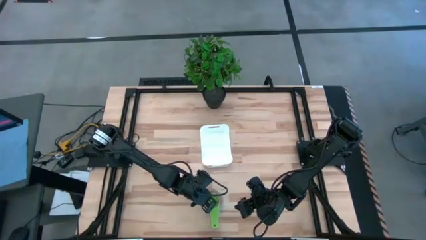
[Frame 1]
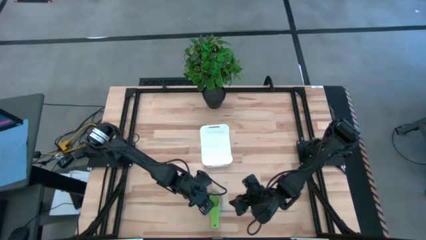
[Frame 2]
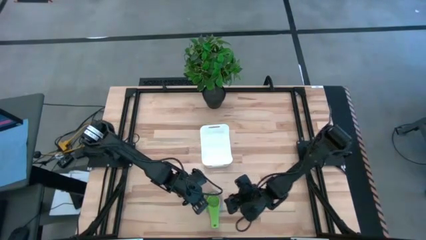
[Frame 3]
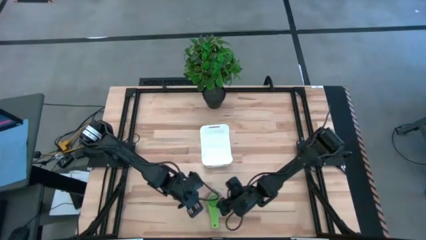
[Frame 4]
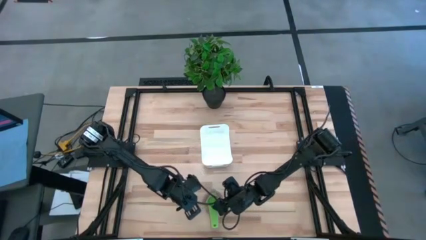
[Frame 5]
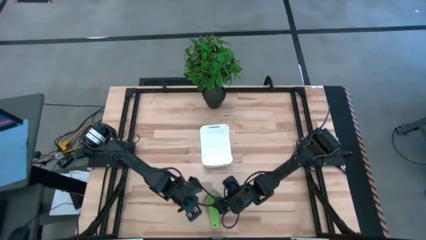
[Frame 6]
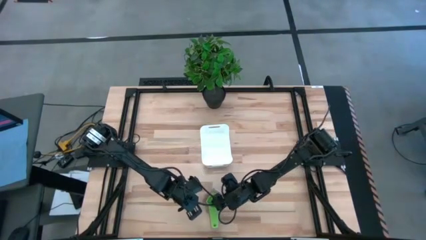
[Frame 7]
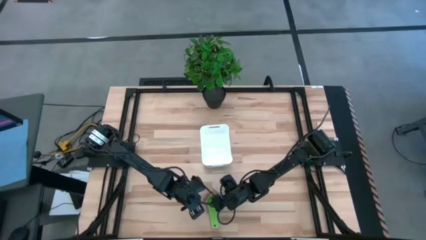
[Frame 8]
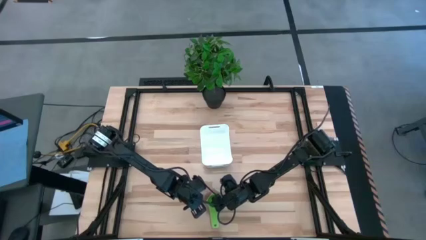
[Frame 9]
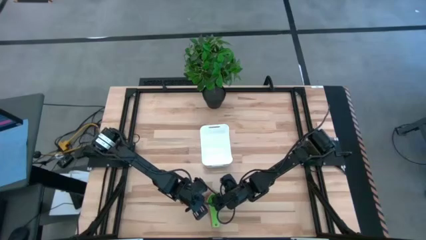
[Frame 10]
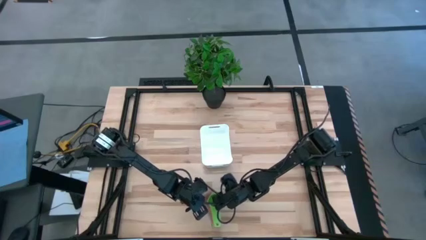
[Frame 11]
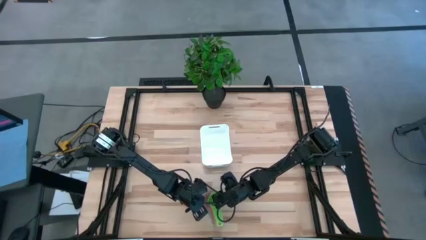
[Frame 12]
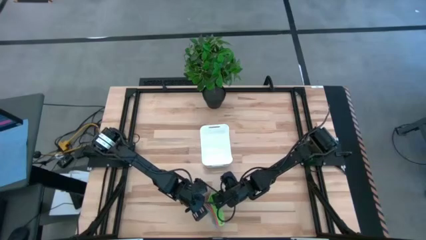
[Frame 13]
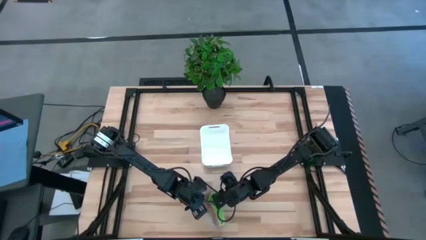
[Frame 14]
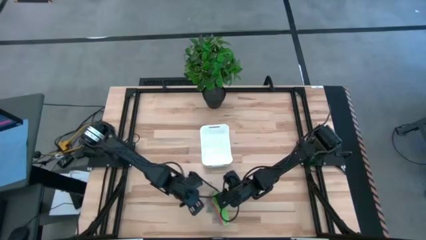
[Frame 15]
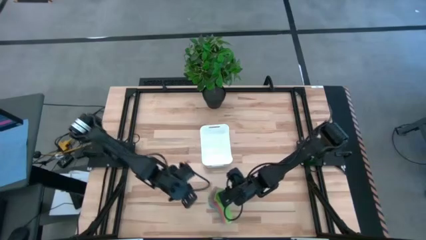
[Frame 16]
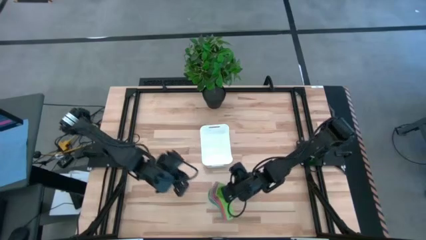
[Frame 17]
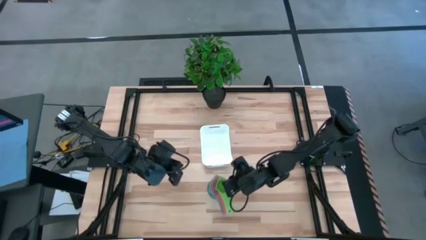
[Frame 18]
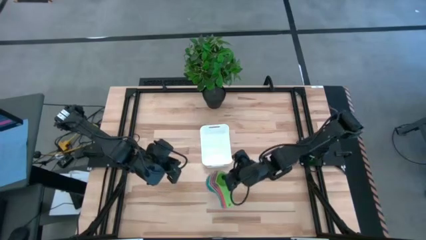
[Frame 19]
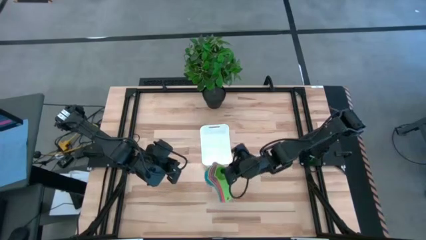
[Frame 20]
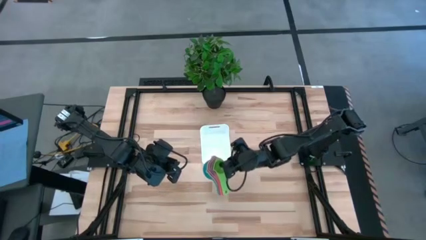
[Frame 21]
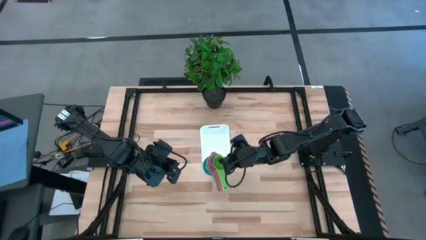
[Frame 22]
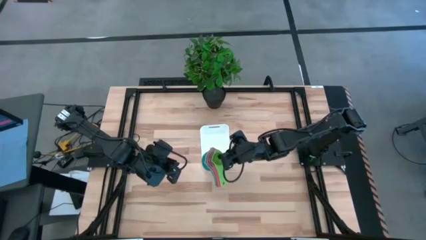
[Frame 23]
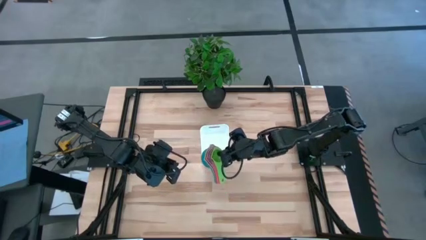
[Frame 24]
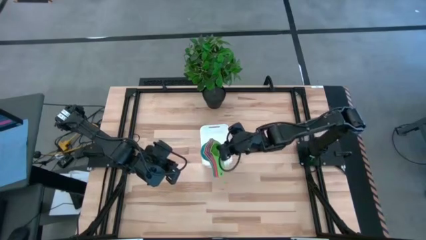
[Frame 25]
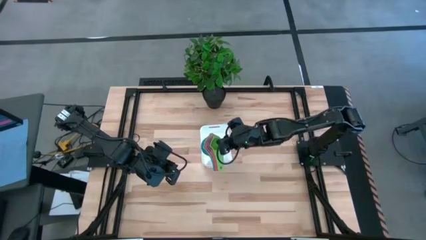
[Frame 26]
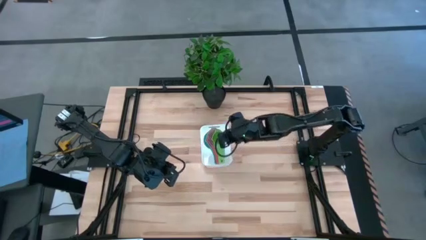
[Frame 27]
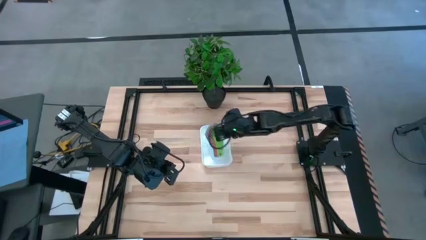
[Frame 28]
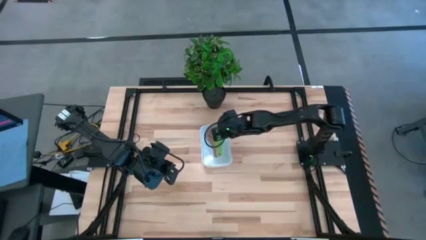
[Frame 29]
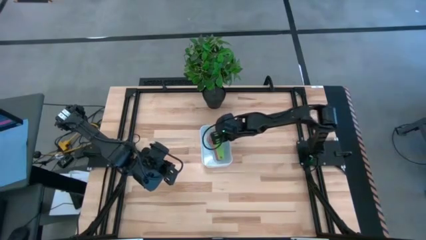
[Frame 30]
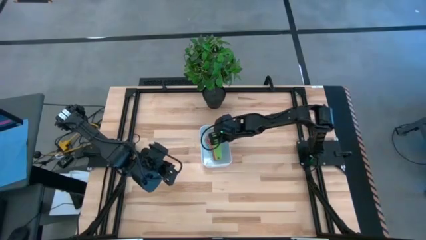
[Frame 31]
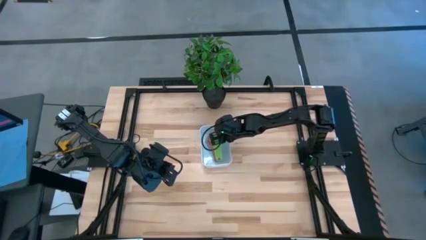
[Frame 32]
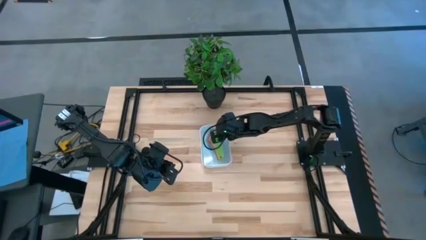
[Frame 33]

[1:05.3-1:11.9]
Task: Nest measuring cups in basket
Put the nested measuring cups into the white bin

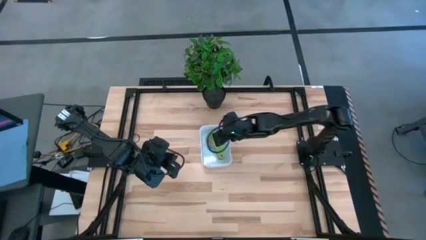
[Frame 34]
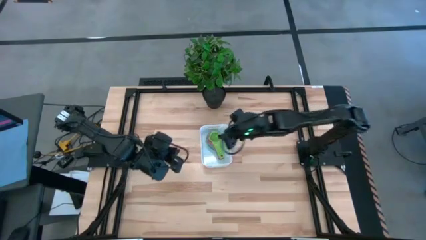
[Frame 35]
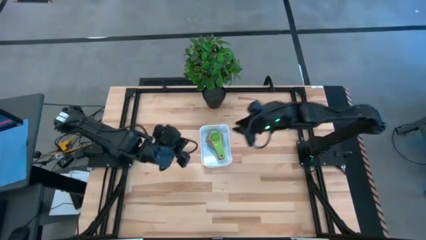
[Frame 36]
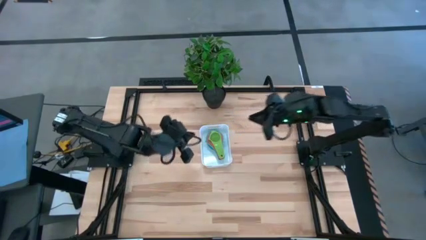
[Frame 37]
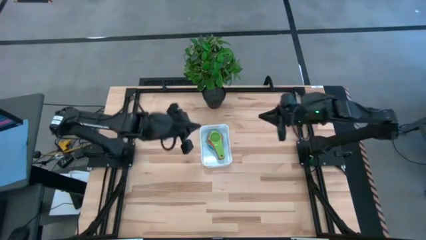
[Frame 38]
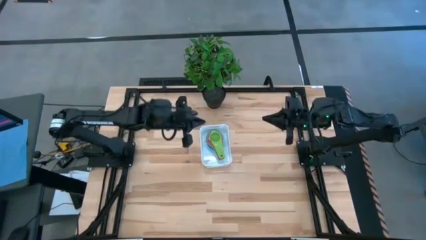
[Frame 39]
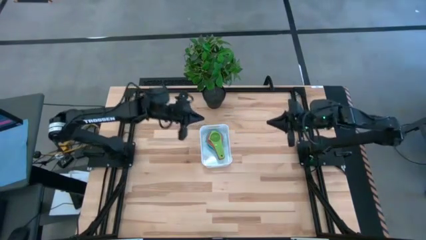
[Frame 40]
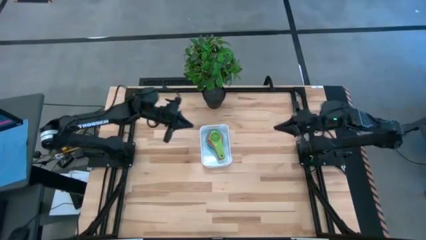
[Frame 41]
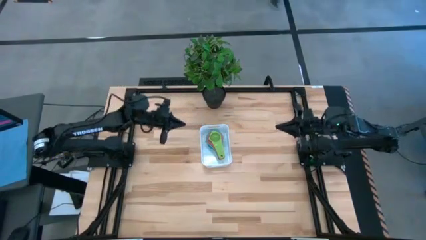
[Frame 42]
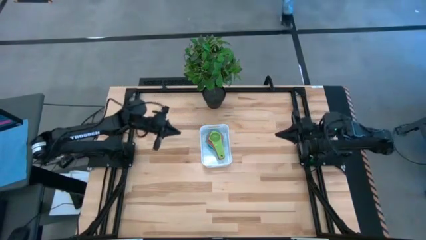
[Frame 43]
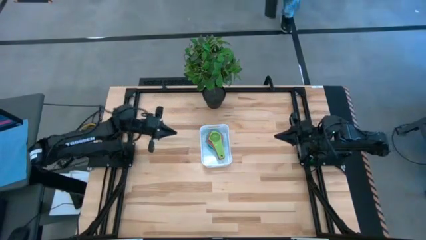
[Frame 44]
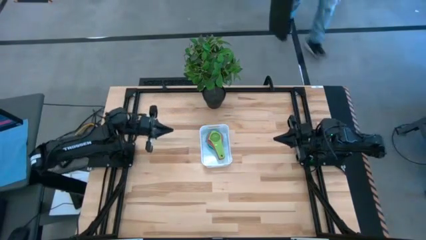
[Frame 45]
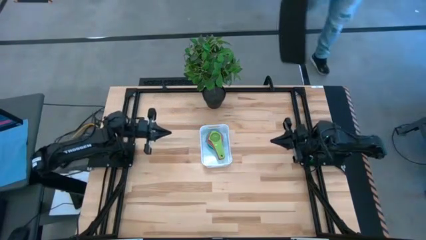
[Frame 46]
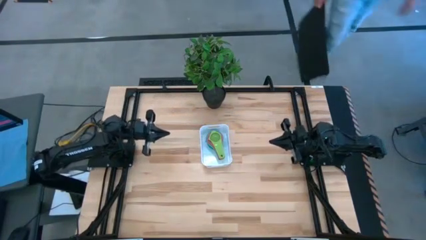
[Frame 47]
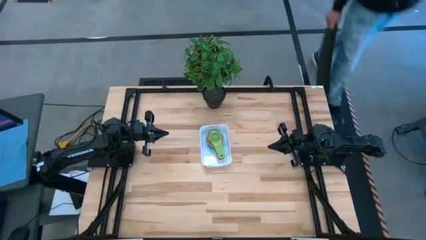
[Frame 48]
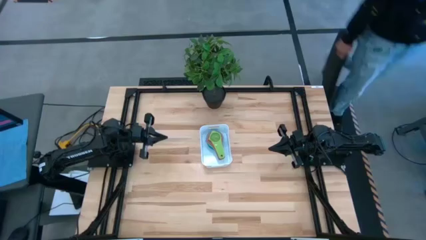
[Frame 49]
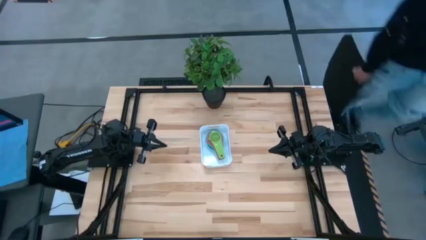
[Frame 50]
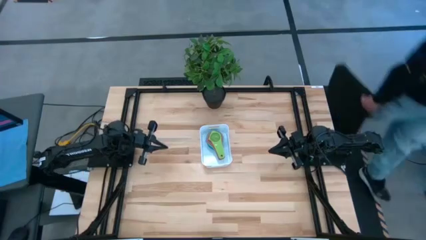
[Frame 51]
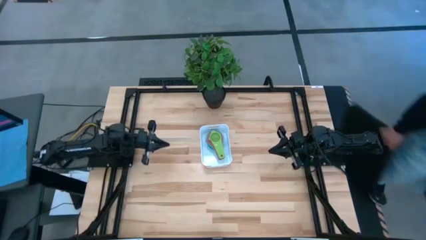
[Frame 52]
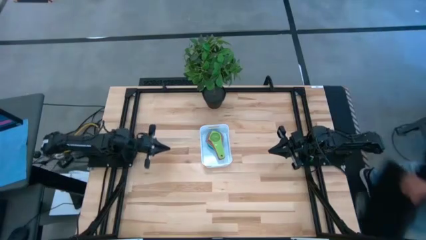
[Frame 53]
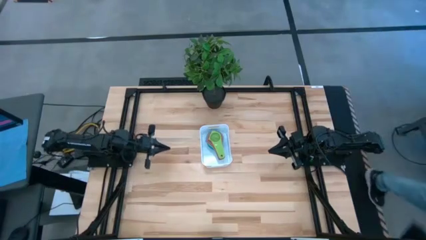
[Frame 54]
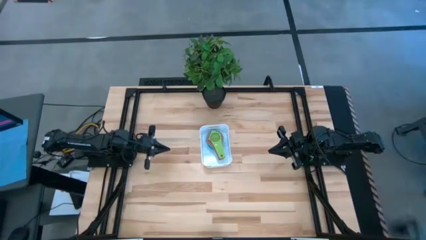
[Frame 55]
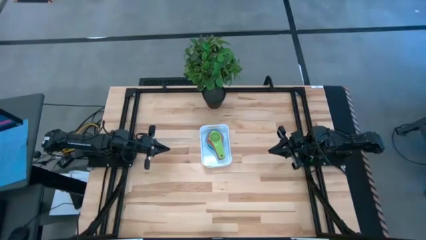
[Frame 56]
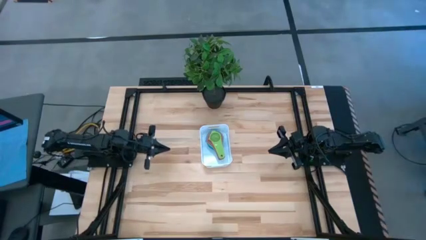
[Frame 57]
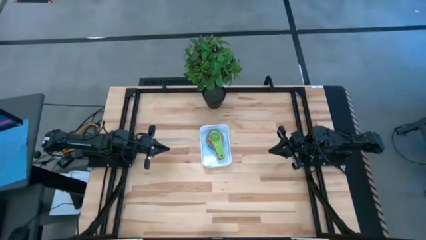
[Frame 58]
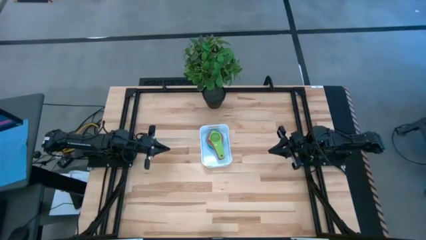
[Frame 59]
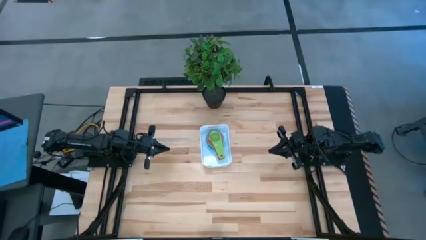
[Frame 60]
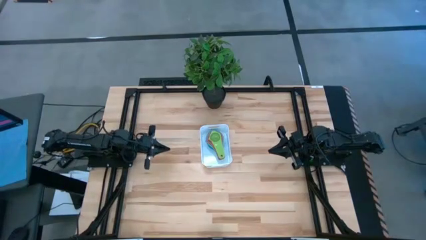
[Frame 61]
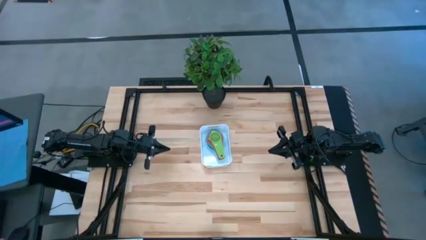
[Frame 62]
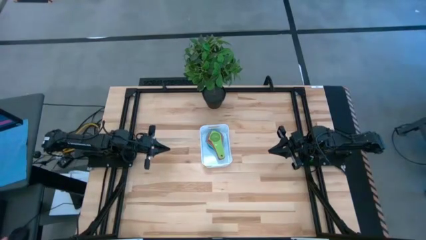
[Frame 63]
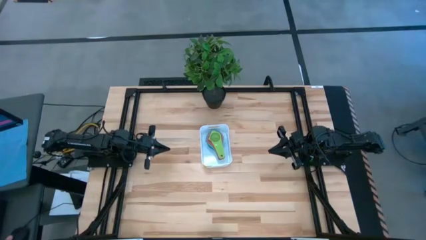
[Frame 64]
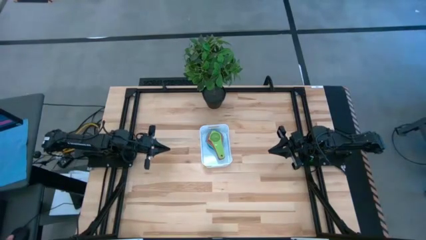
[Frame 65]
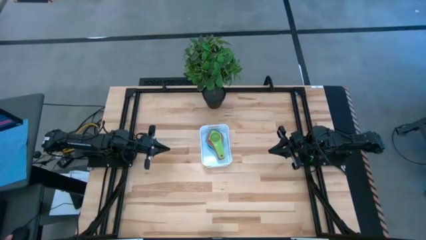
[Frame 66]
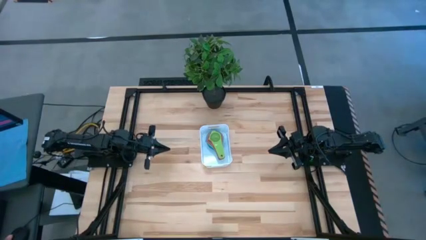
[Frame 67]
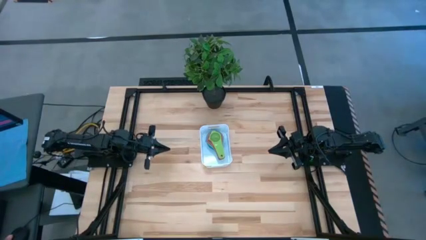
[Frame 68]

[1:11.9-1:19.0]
Return to Home Position
